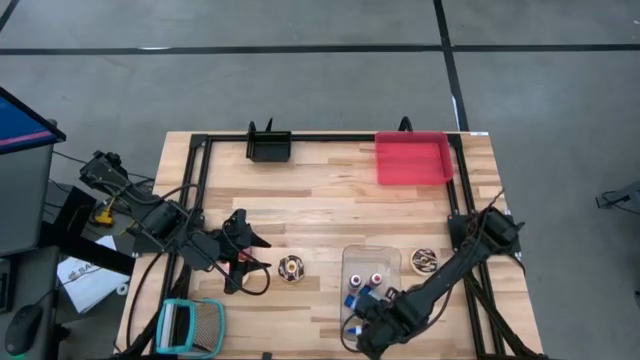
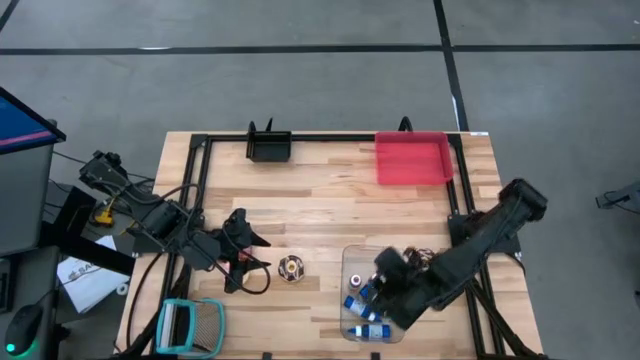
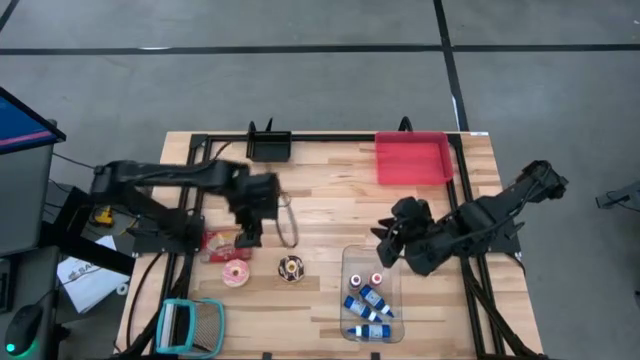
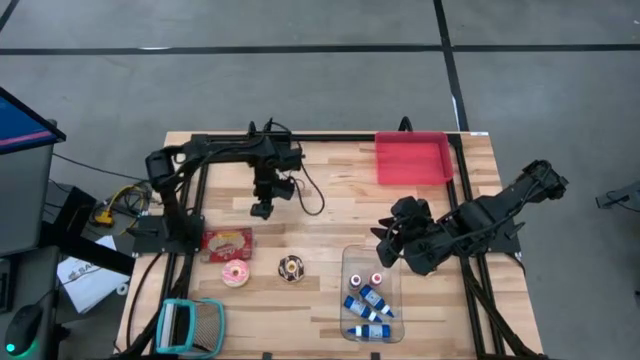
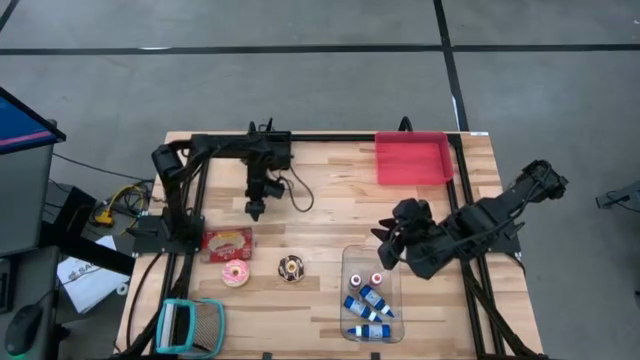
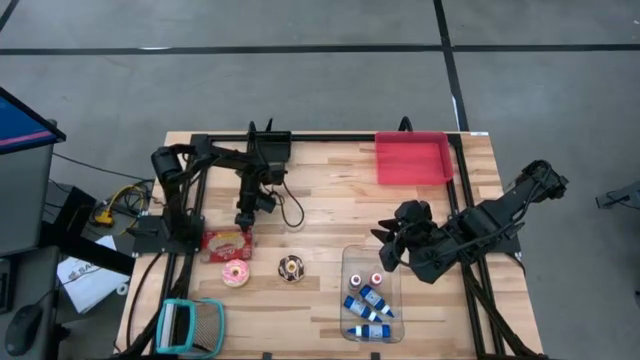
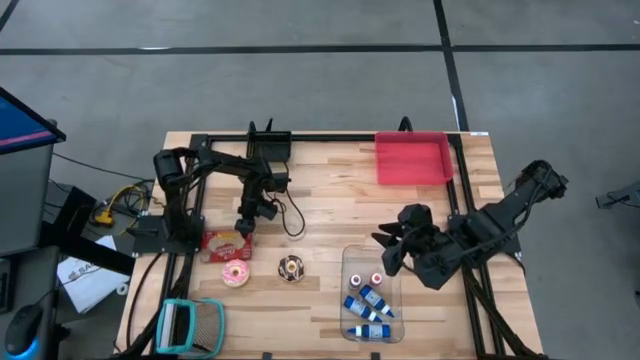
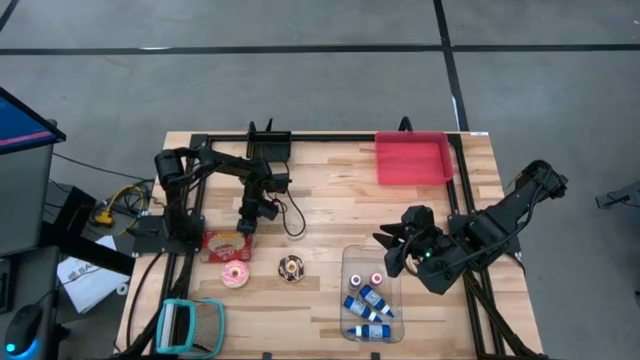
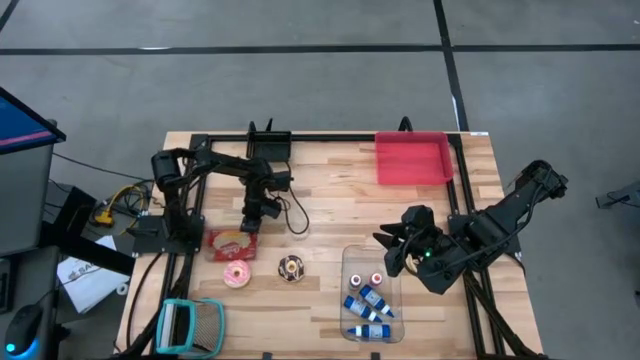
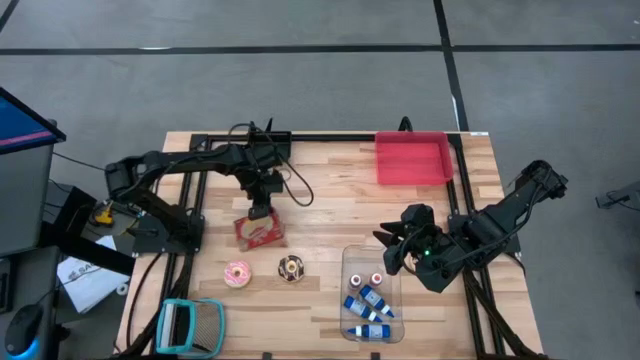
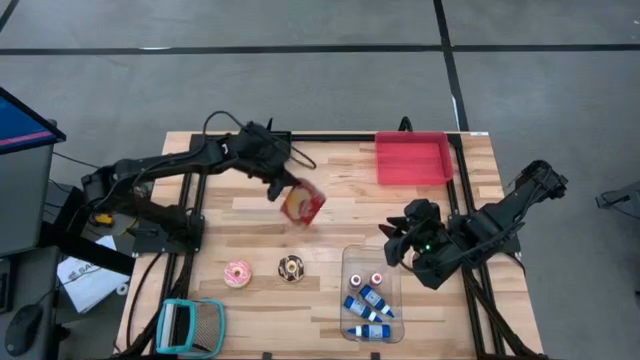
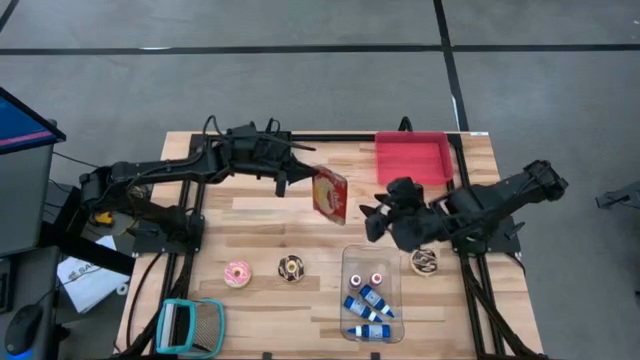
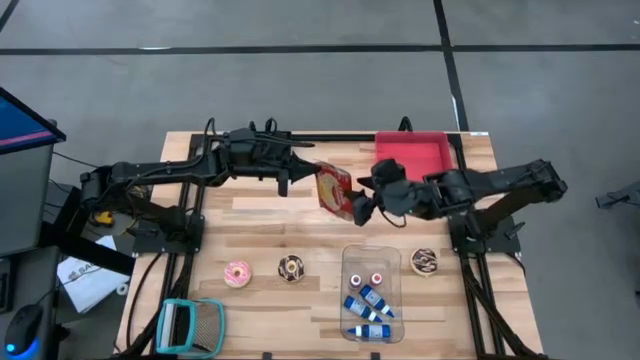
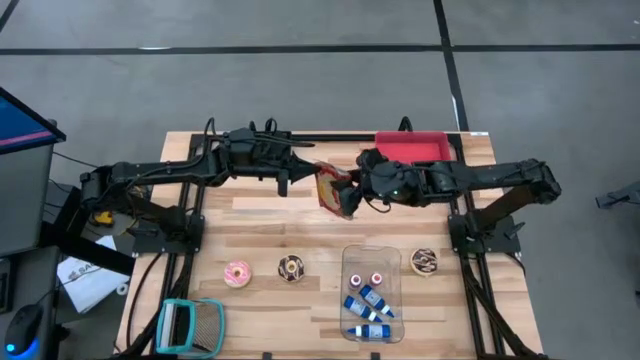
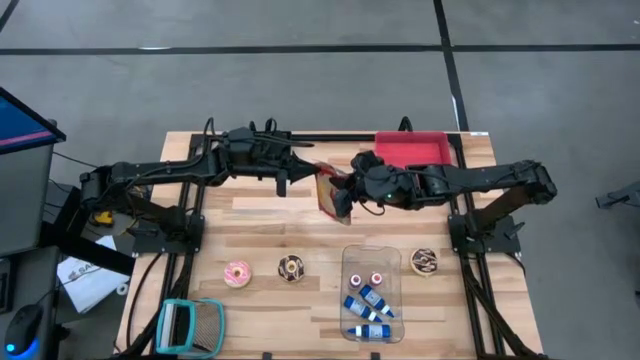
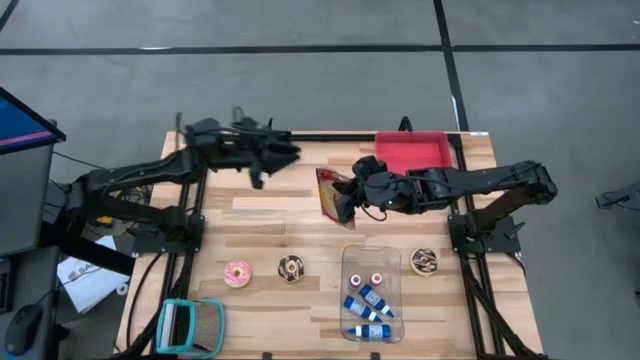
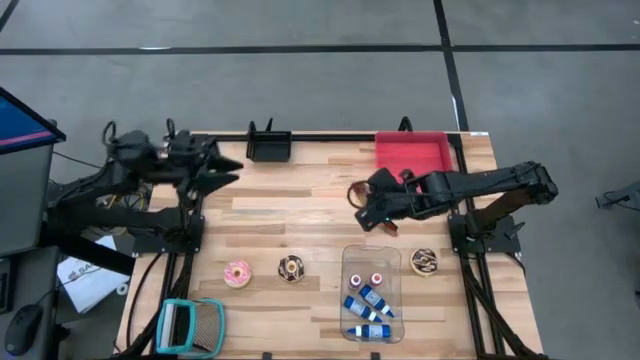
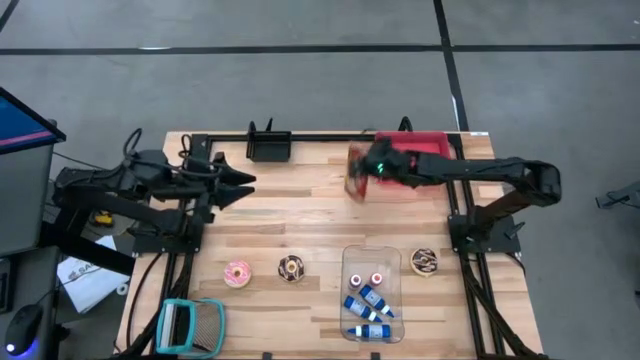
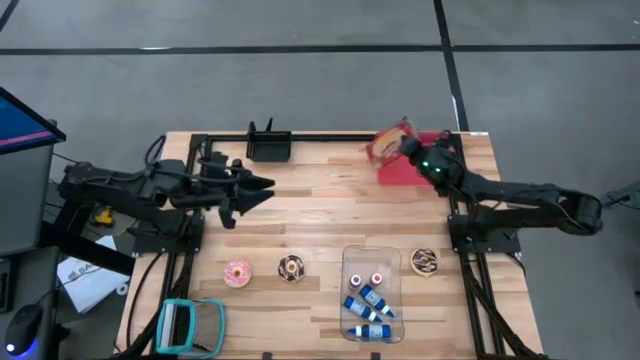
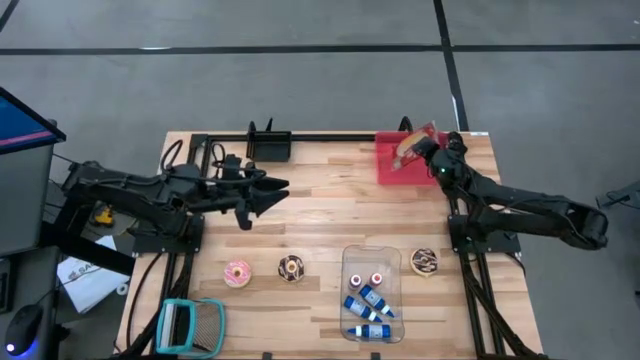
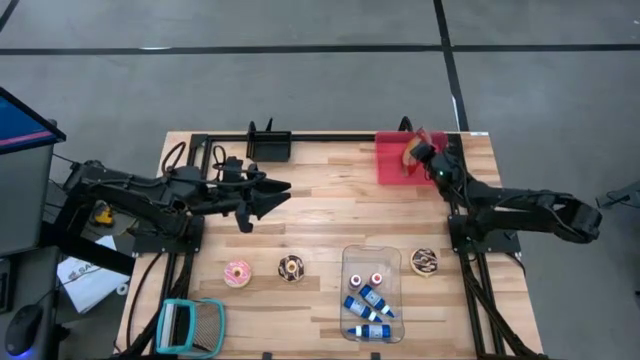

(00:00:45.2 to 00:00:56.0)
Put the popcorn bag into the red transparent bin

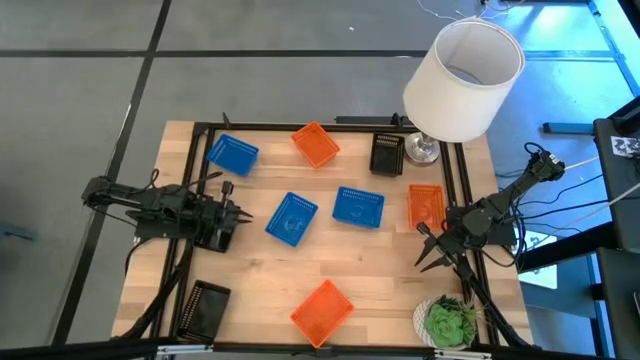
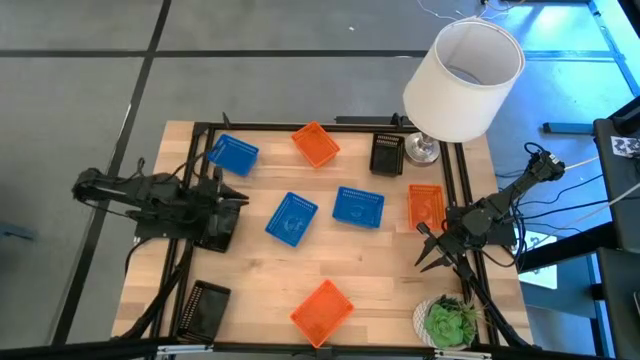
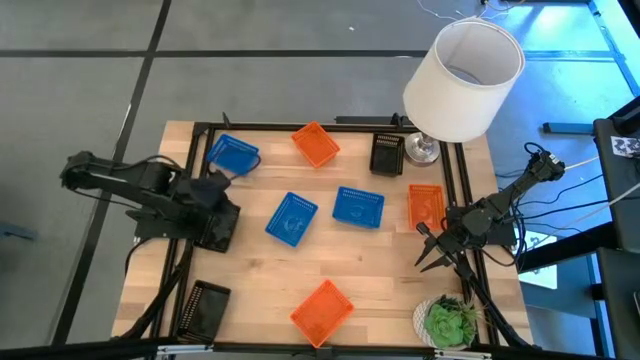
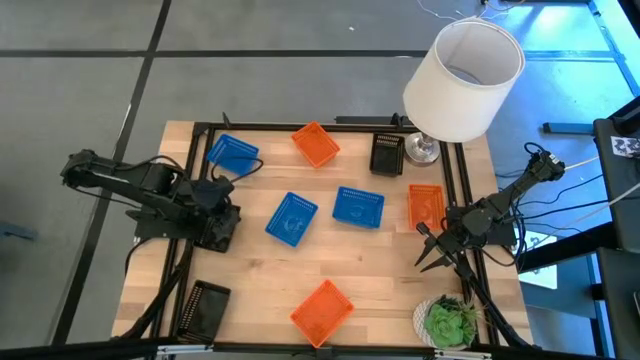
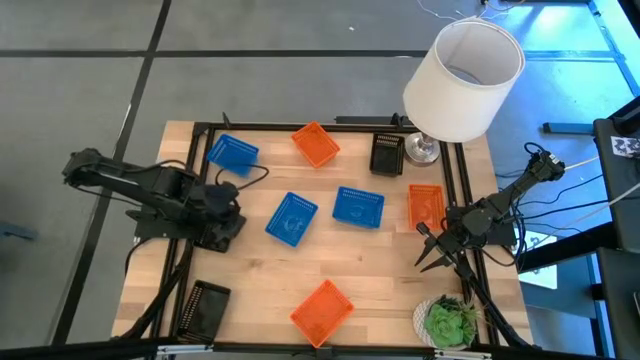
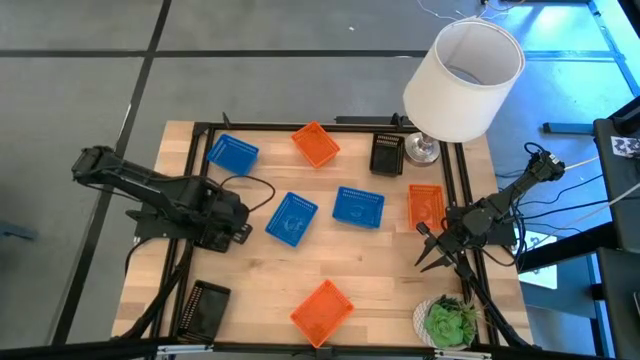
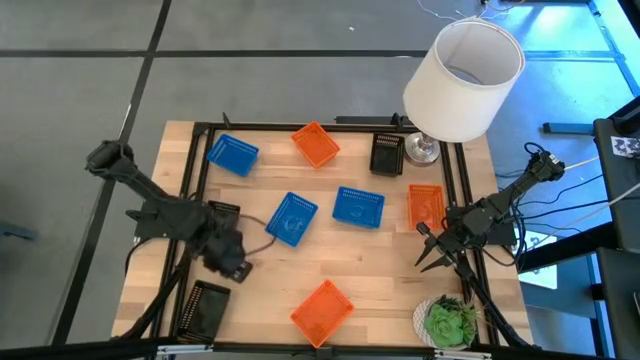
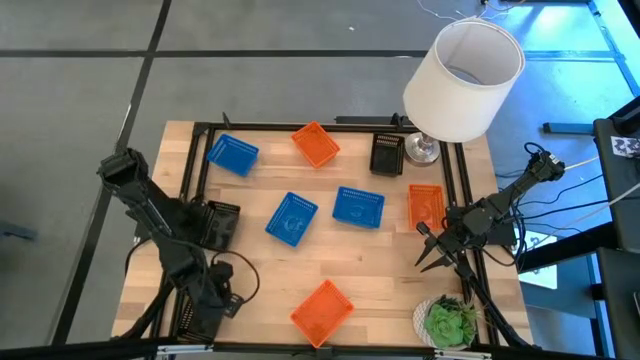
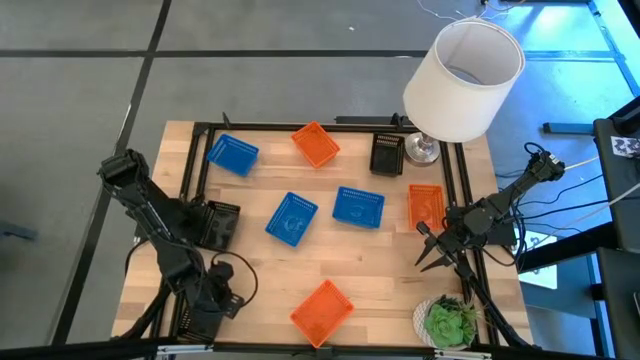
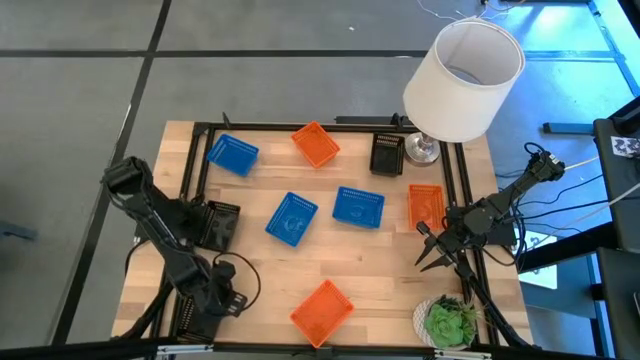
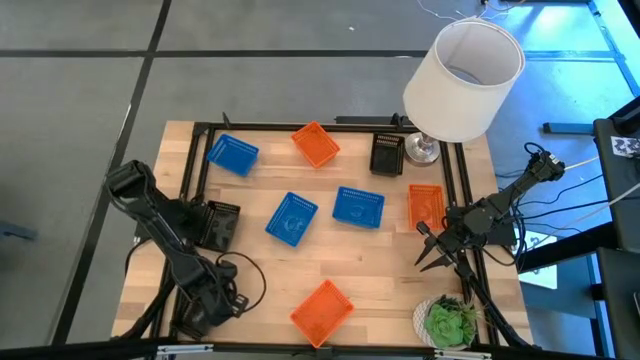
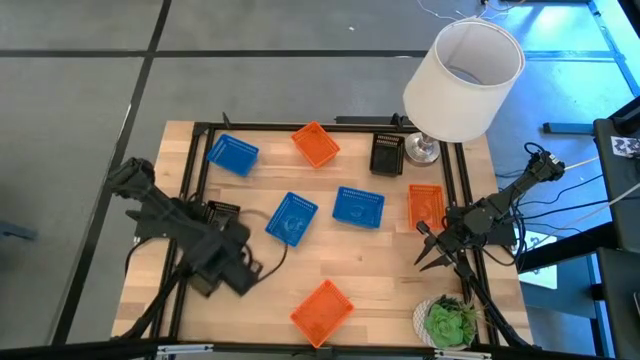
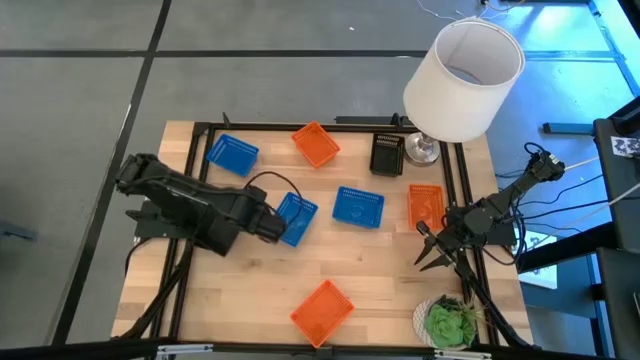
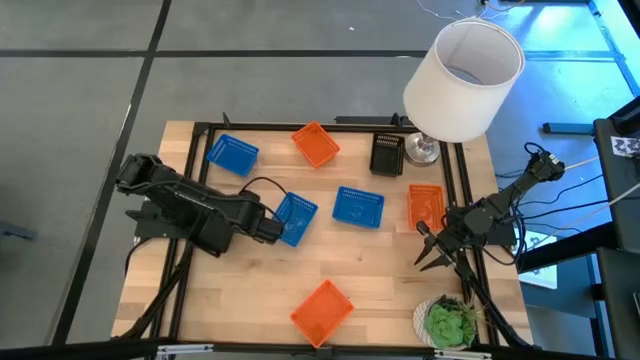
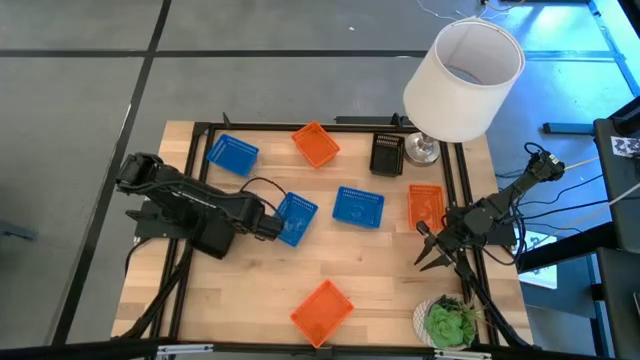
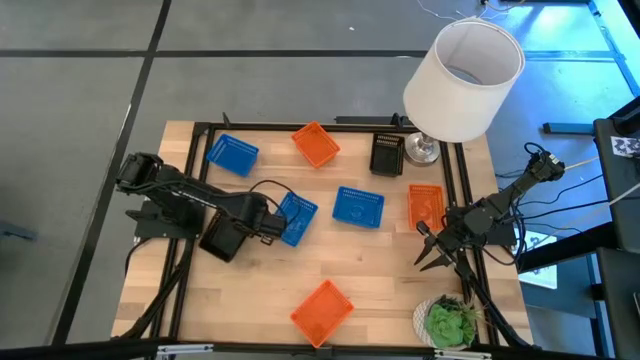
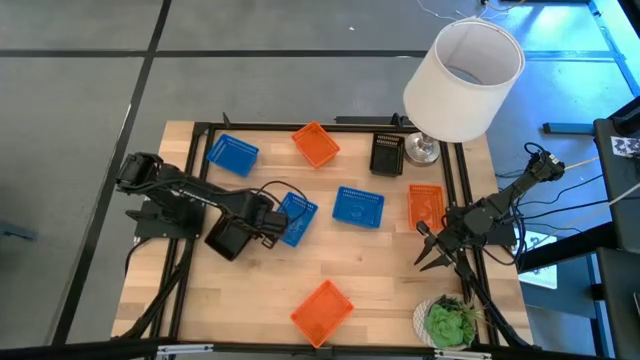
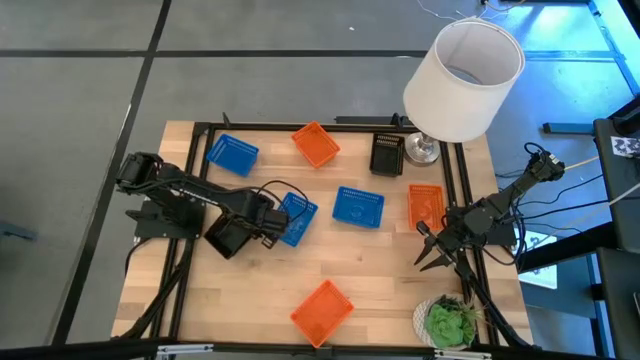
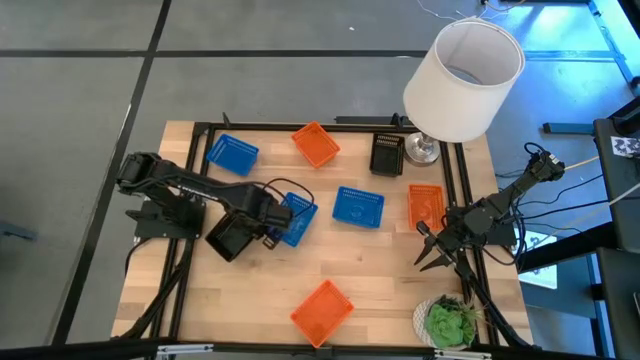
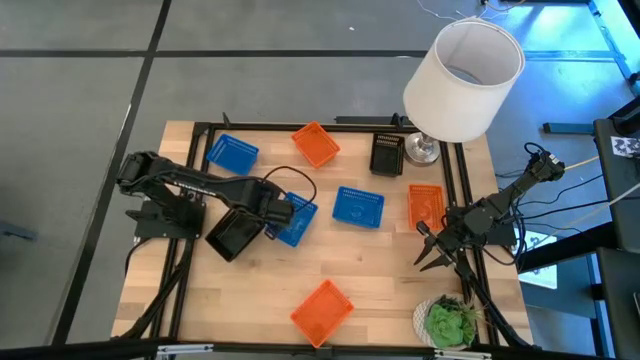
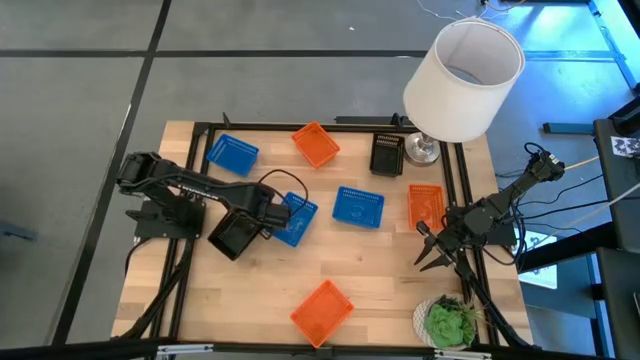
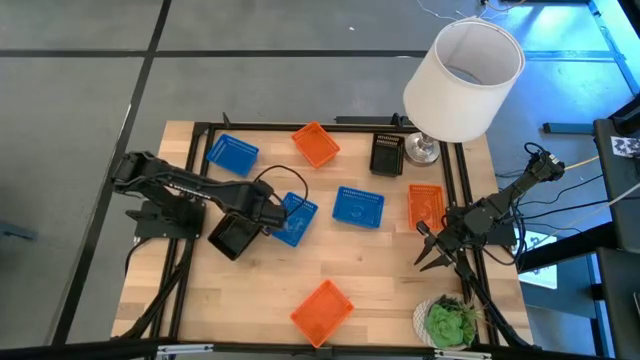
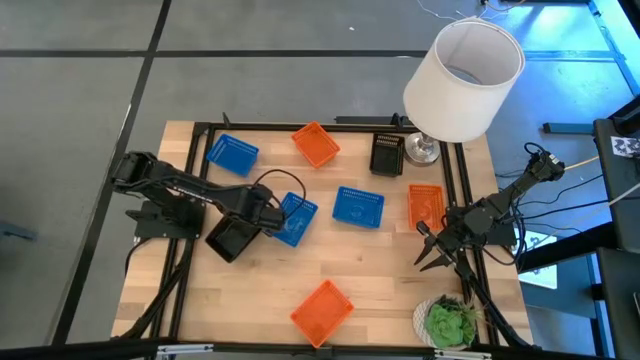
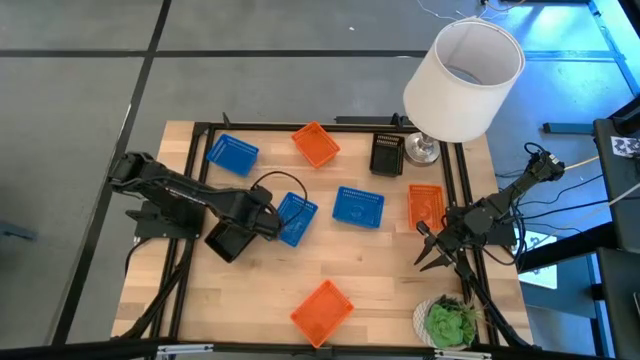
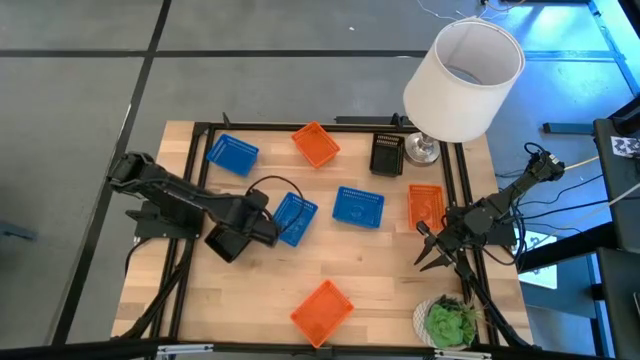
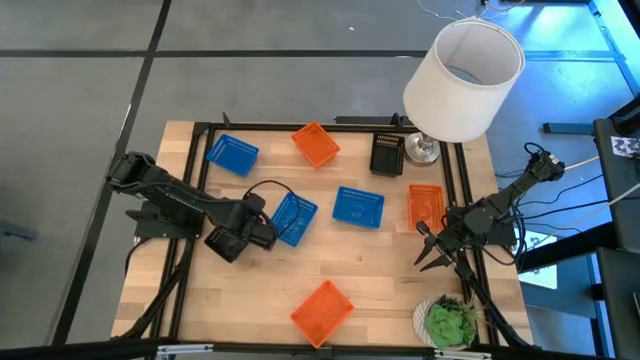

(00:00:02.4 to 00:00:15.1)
Stack the bottom black bin on the middle black bin
